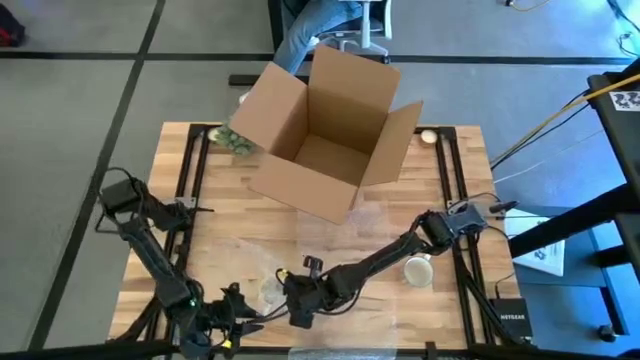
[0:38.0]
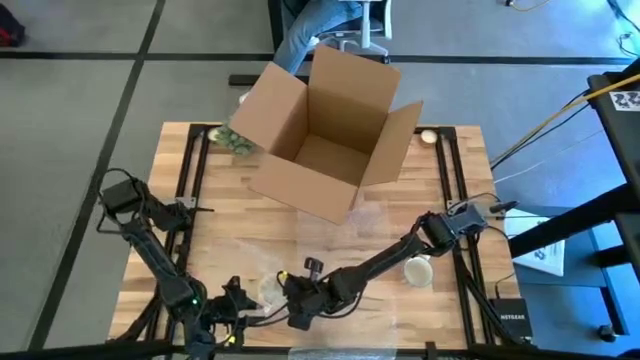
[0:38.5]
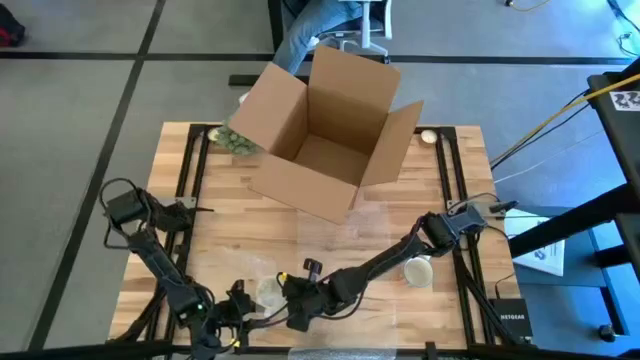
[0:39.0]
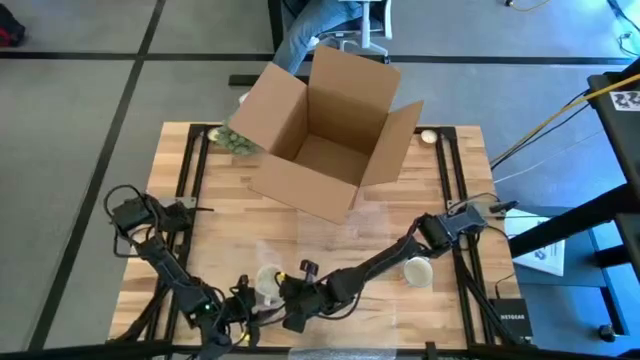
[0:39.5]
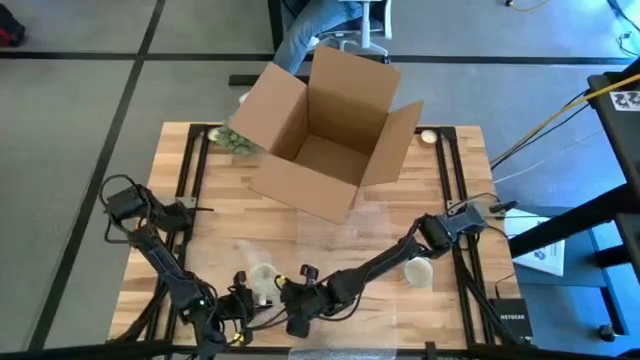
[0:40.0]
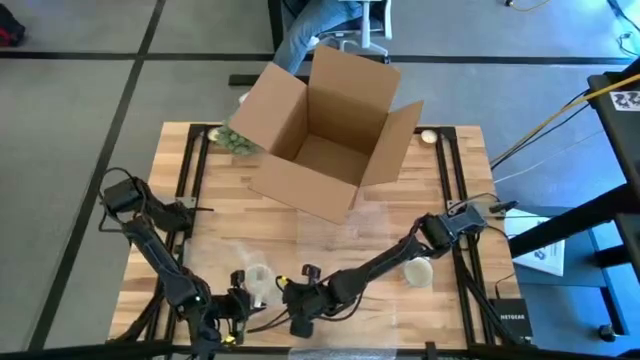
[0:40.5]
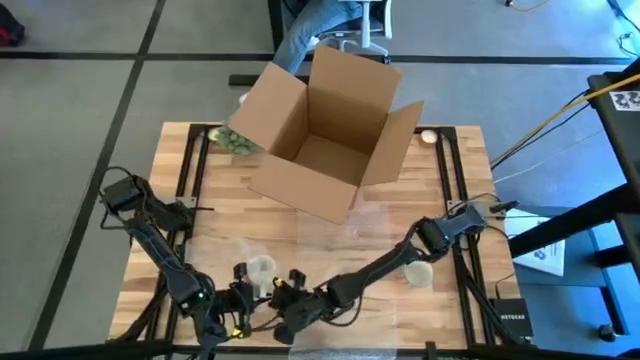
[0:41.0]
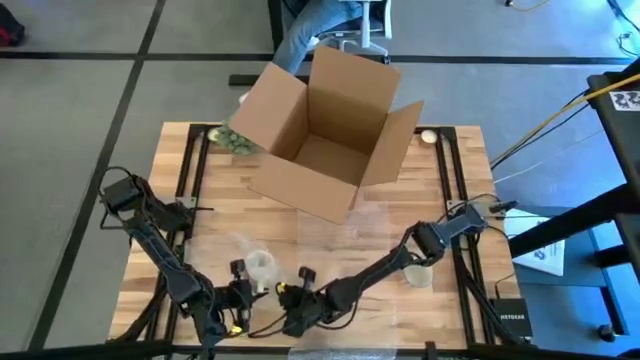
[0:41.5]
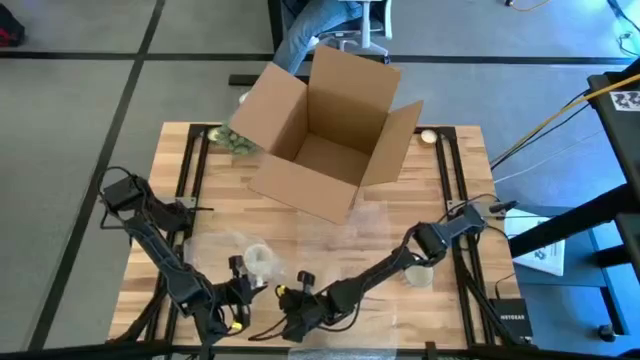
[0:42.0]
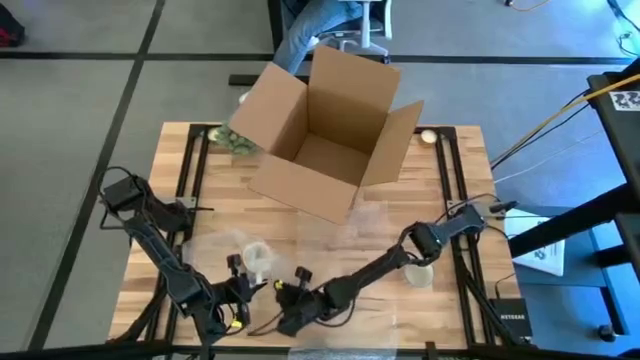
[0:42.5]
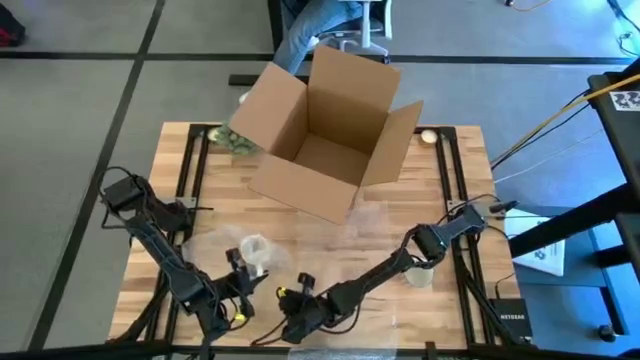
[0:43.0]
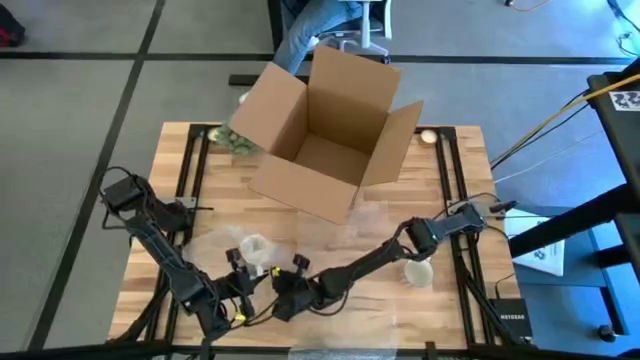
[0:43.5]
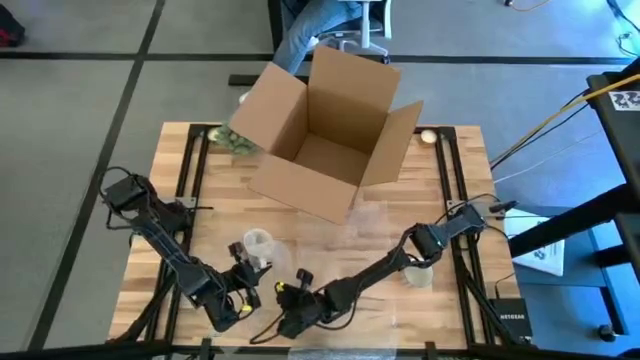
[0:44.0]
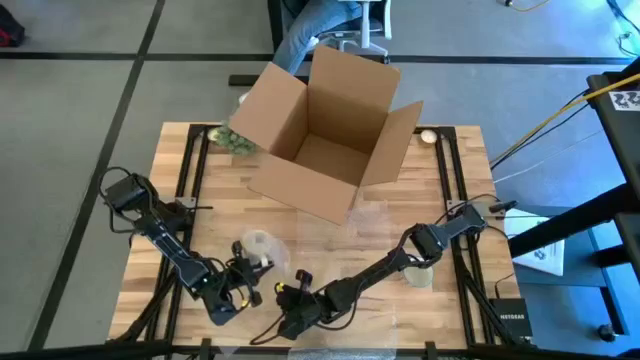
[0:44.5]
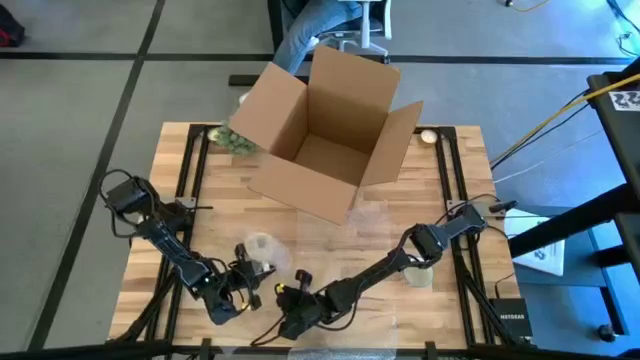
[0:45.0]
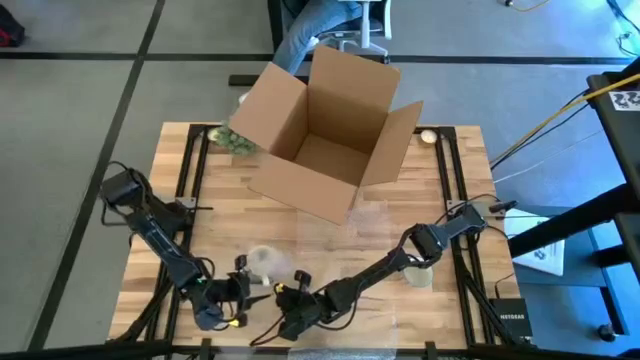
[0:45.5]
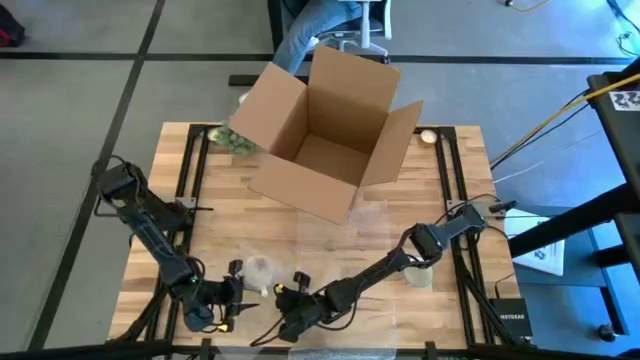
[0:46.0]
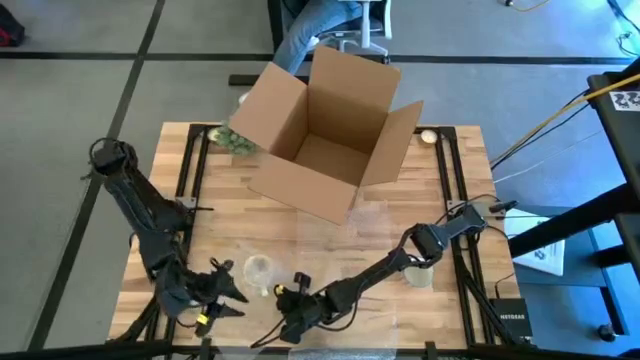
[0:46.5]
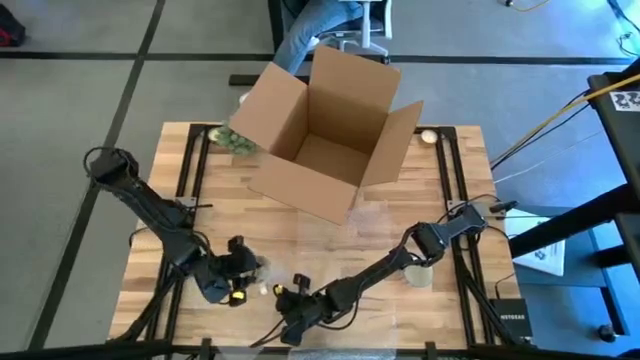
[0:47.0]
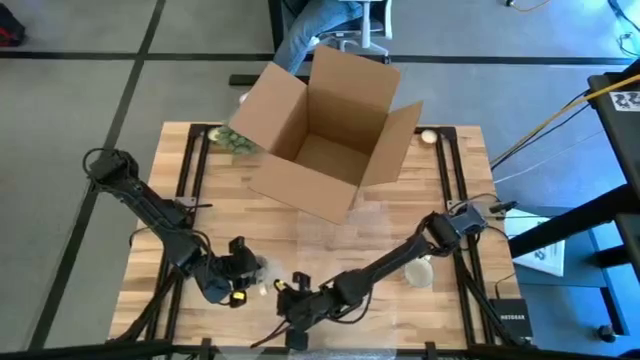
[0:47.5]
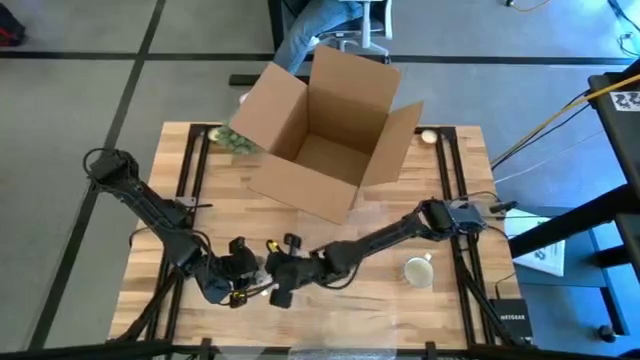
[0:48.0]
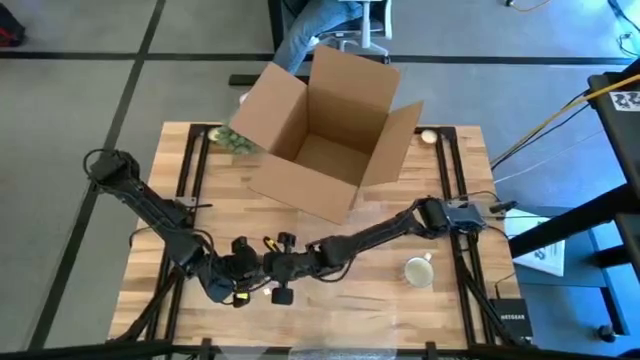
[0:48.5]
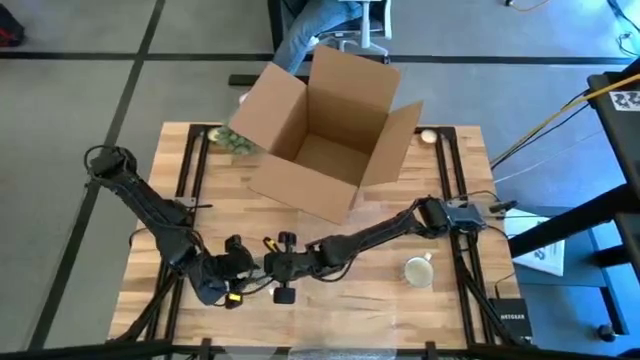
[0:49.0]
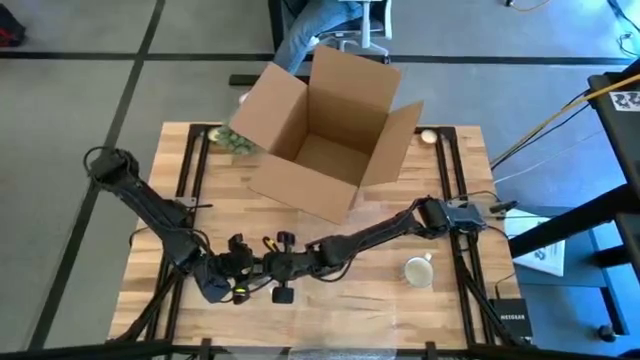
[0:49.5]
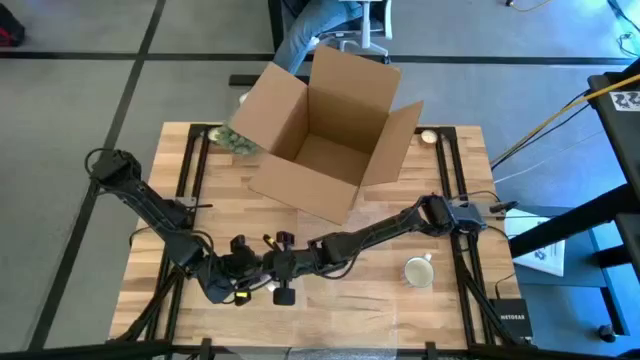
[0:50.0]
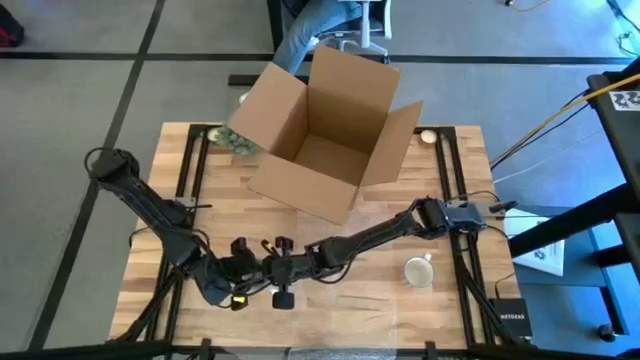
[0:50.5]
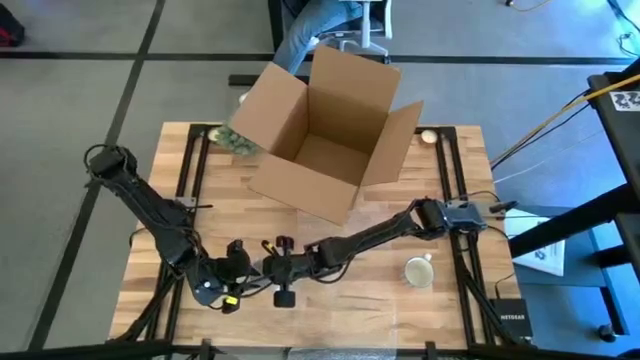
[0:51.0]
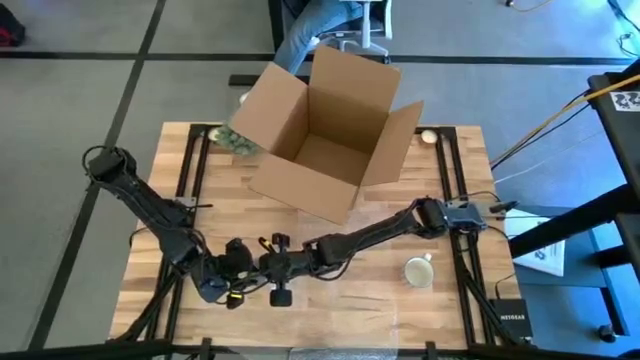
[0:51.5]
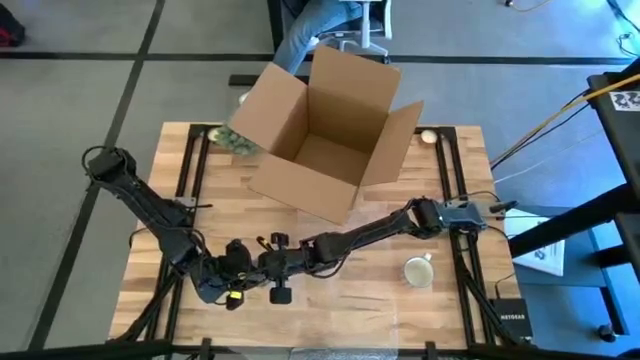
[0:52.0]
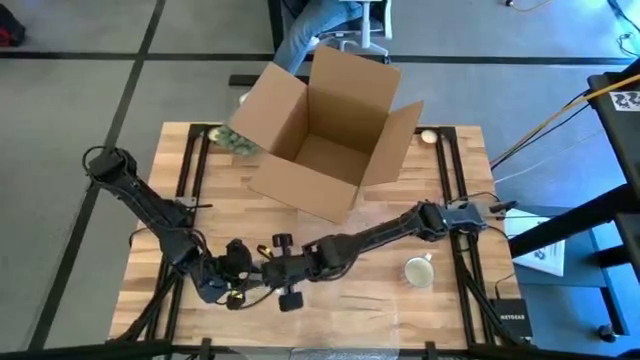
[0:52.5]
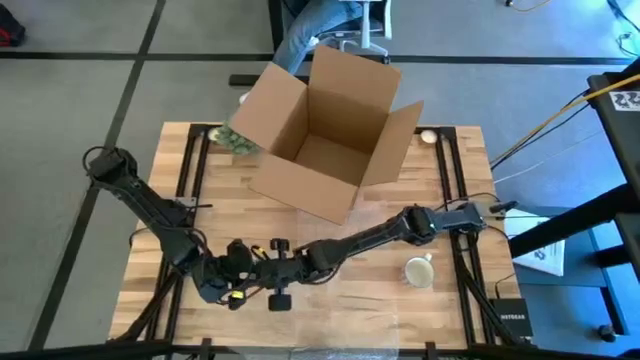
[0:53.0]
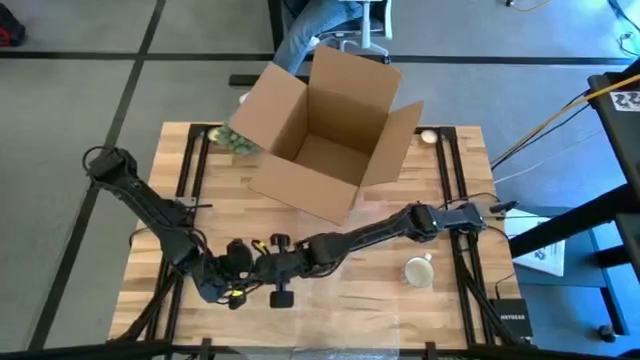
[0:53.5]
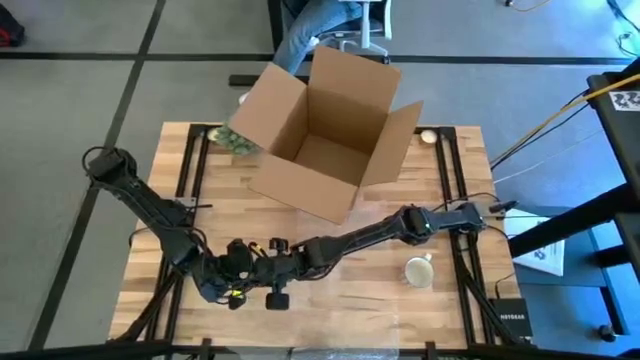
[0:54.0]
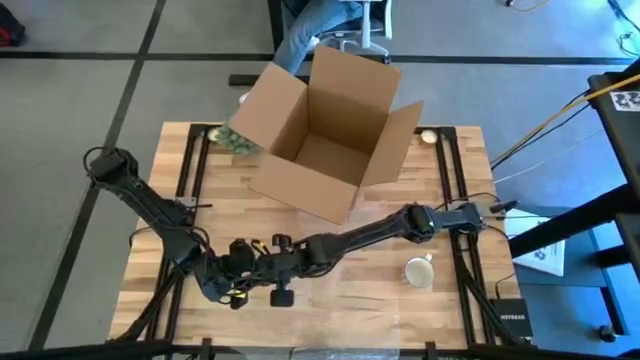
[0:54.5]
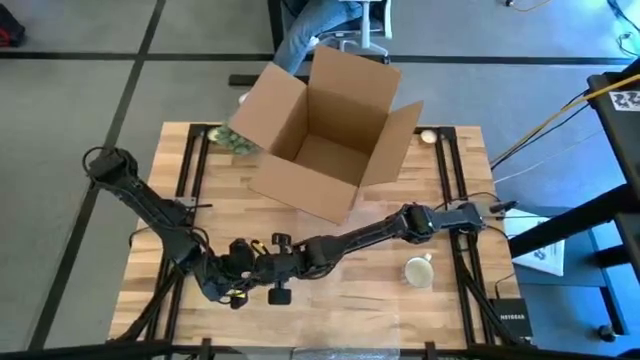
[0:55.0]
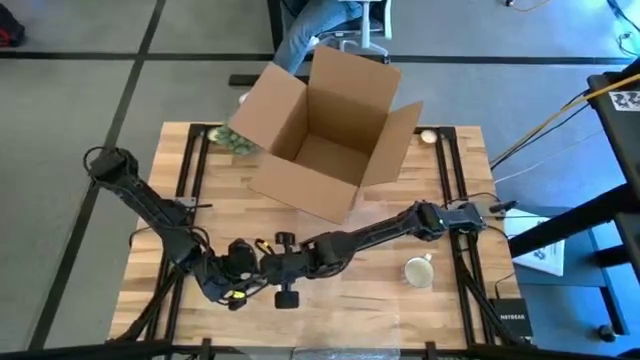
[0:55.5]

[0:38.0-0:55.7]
Task: wrap mug
Wrap the orange mug with the left bubble wrap

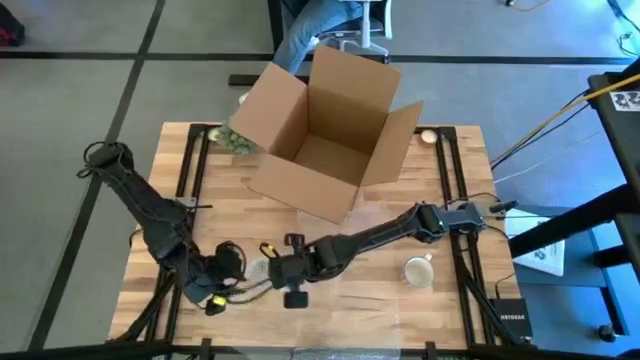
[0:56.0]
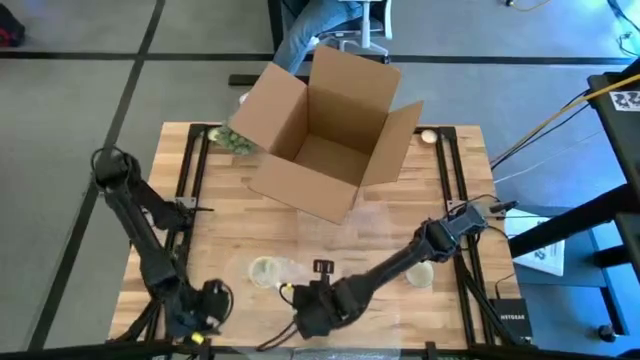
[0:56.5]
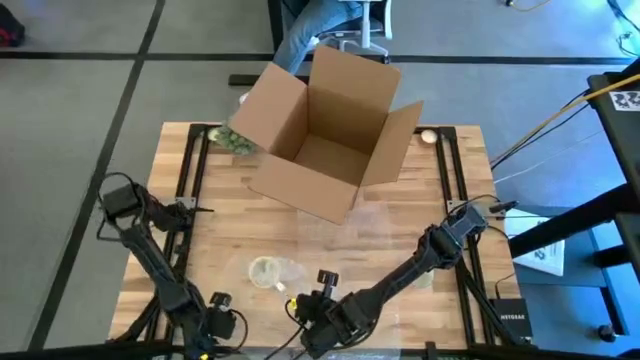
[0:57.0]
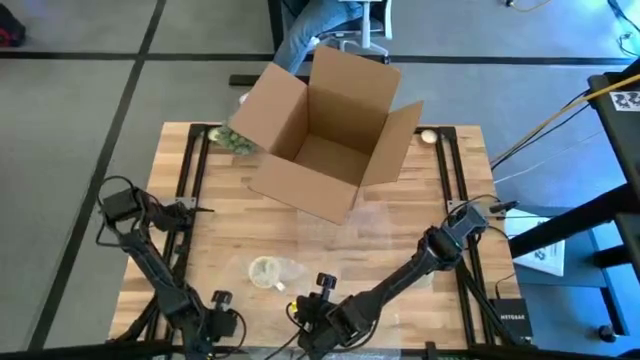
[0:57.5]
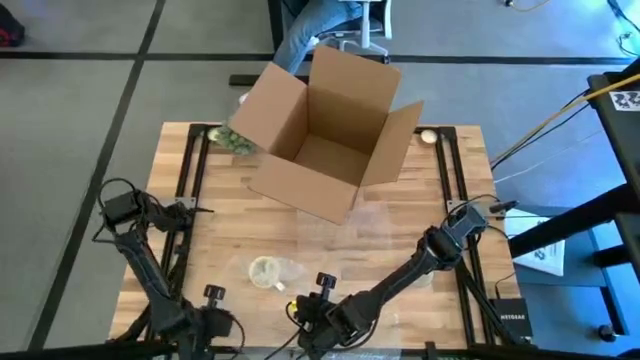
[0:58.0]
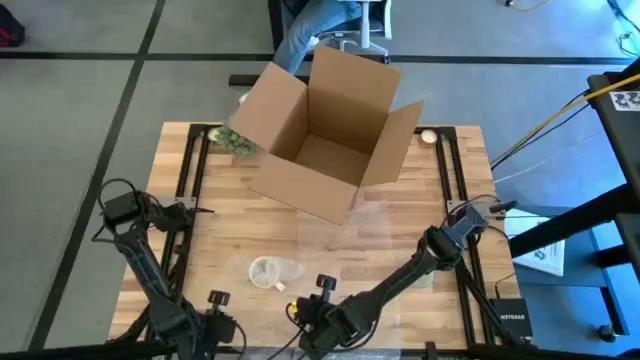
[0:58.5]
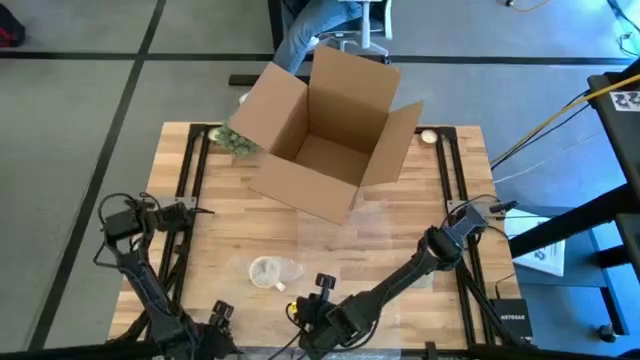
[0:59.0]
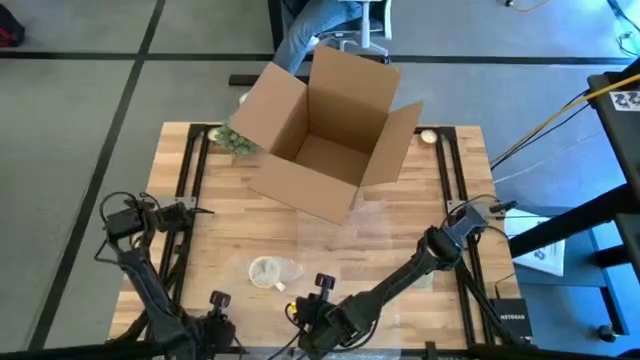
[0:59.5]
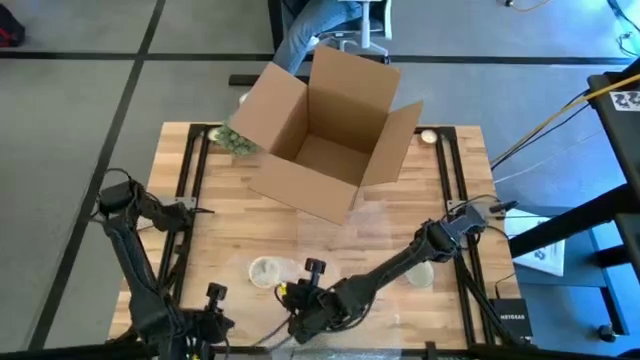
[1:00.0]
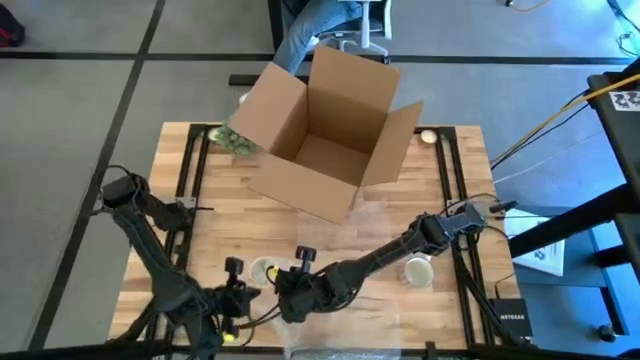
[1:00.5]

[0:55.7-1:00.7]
Wrap the orange mug with the left bubble wrap
